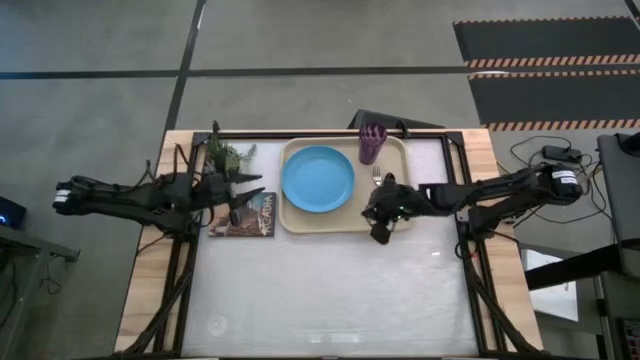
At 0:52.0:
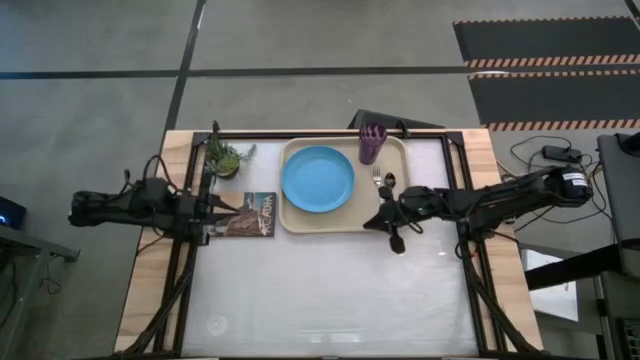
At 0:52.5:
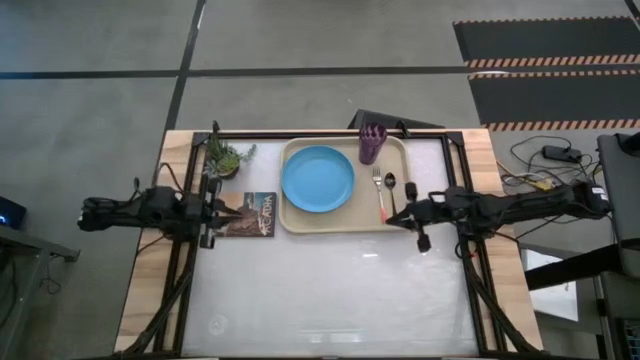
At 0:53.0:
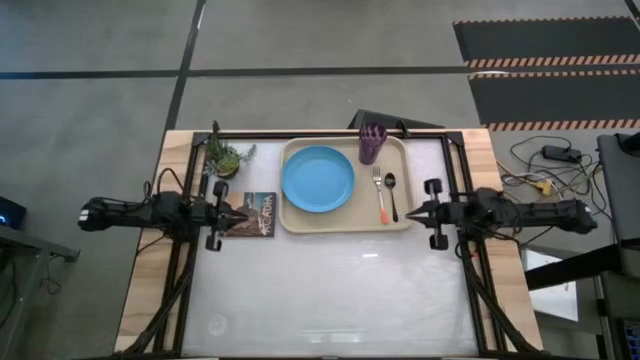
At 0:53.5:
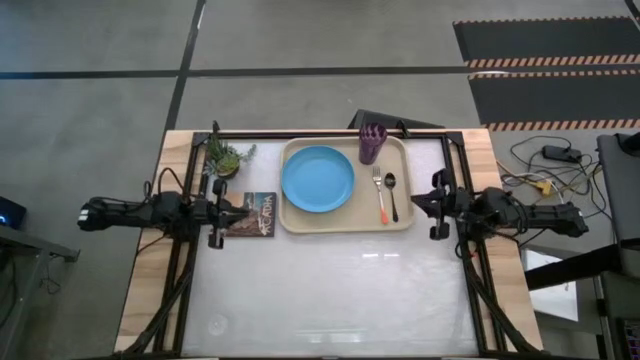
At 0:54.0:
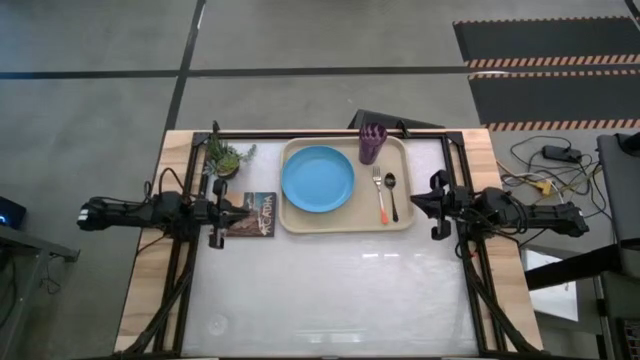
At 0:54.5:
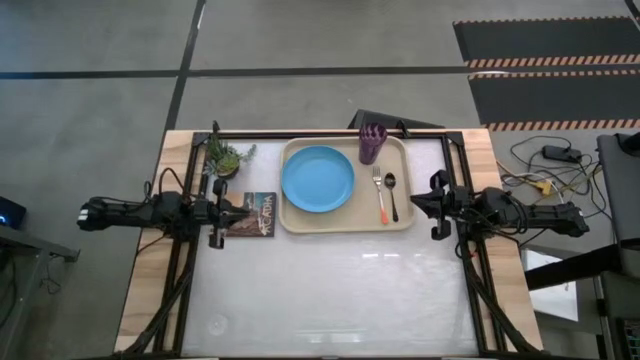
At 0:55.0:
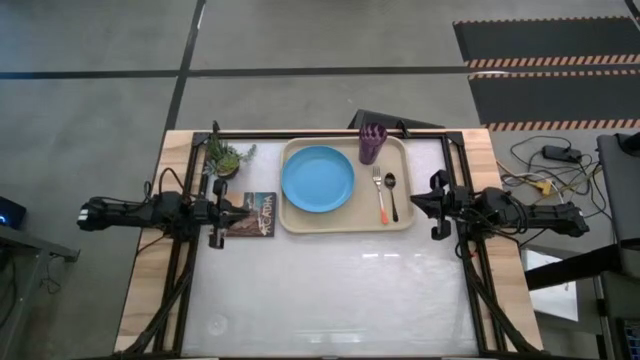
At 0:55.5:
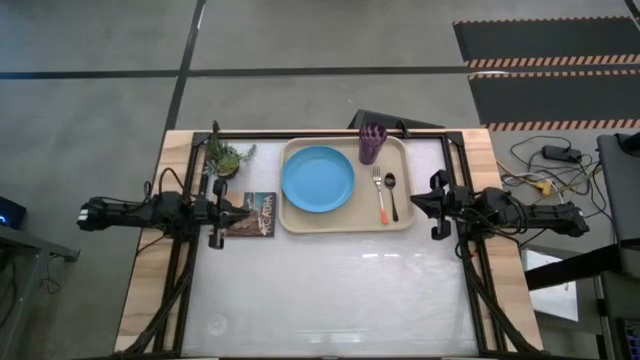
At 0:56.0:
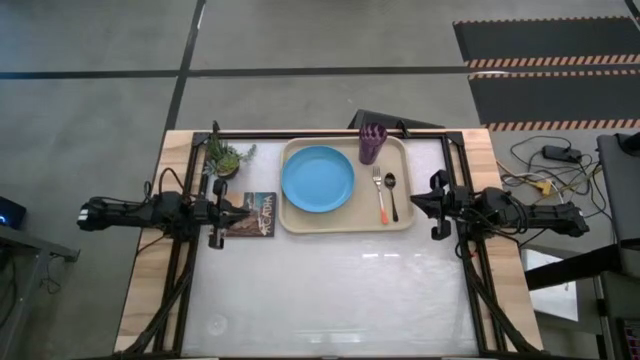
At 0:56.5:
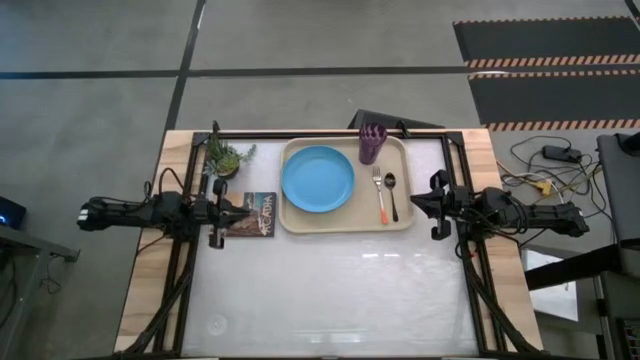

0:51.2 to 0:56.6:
Task: Pick and place plate/cup/fork/spoon on tray
Return to Home Position

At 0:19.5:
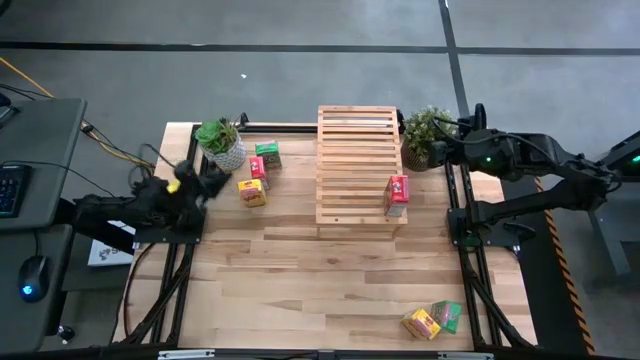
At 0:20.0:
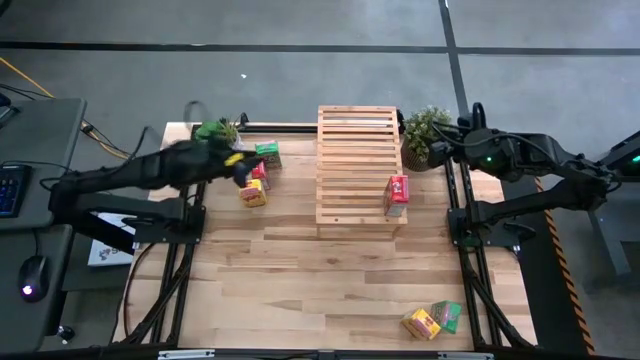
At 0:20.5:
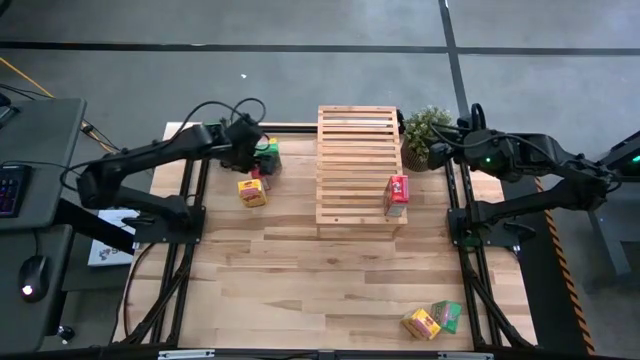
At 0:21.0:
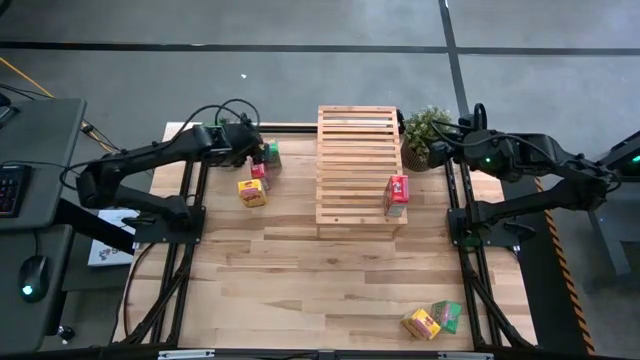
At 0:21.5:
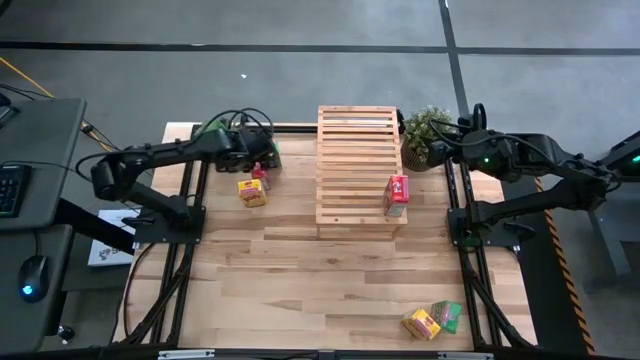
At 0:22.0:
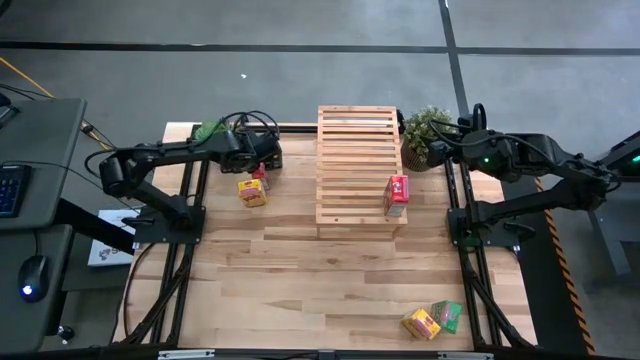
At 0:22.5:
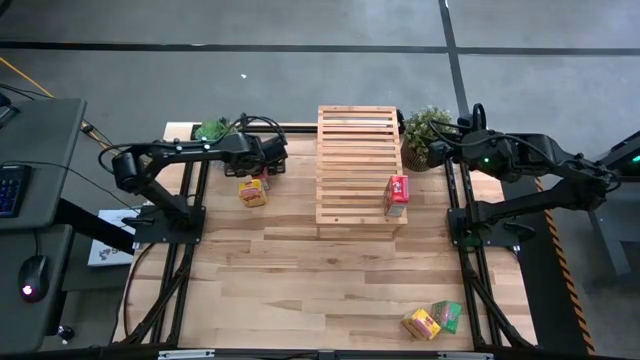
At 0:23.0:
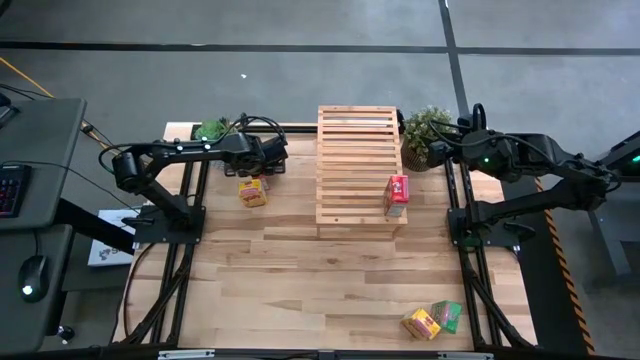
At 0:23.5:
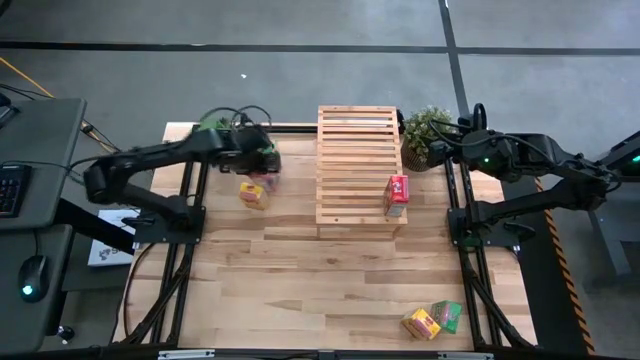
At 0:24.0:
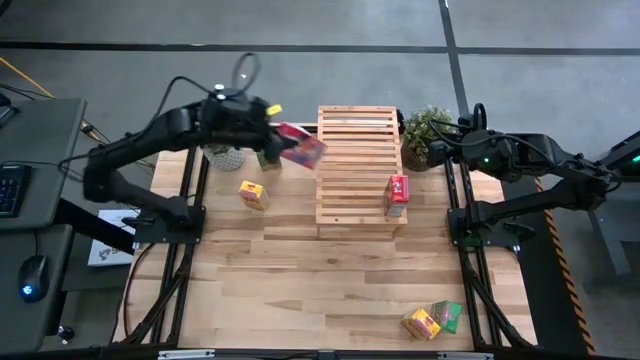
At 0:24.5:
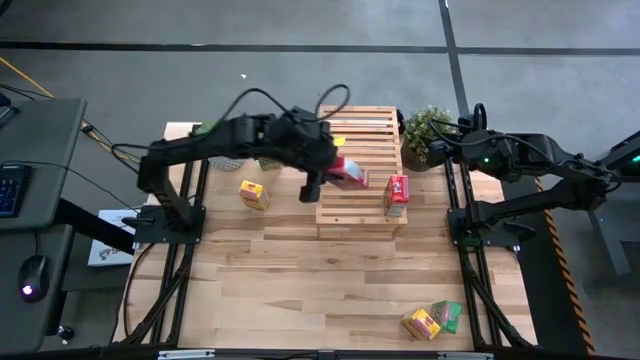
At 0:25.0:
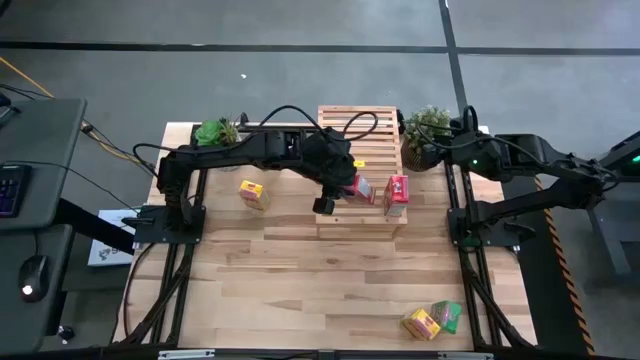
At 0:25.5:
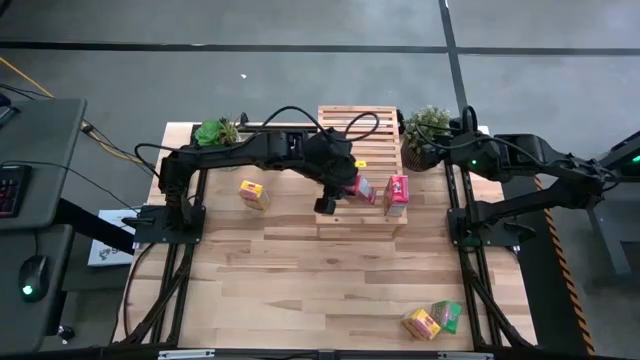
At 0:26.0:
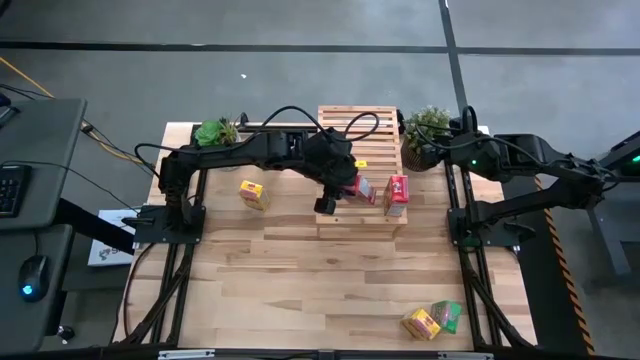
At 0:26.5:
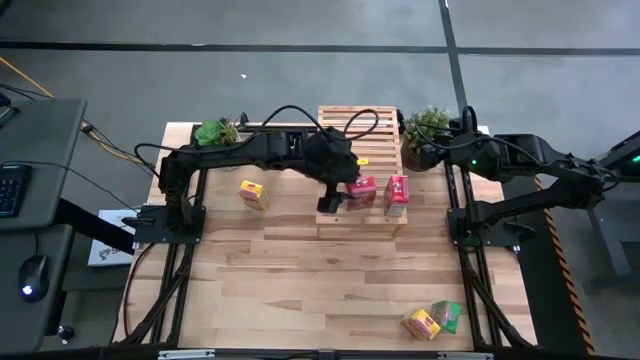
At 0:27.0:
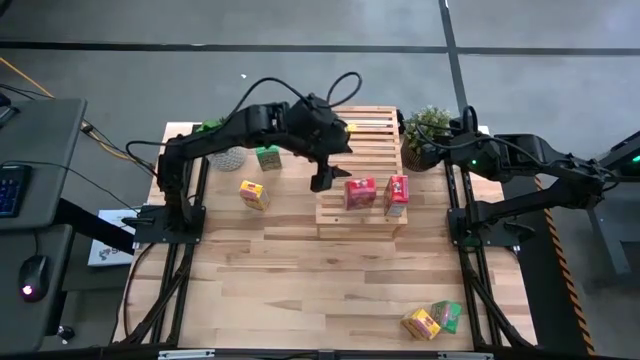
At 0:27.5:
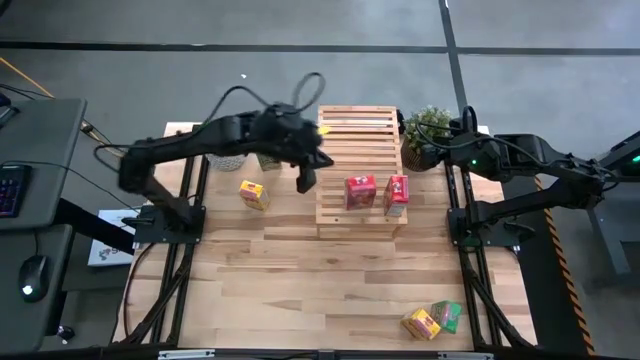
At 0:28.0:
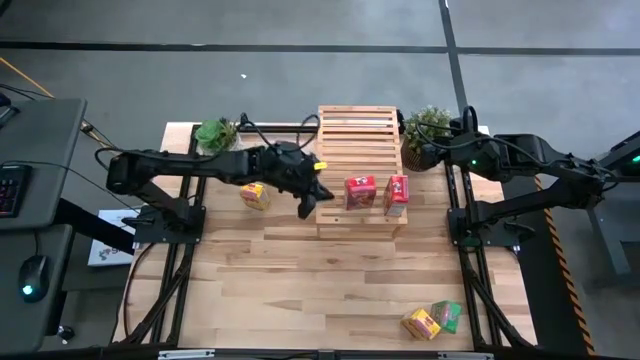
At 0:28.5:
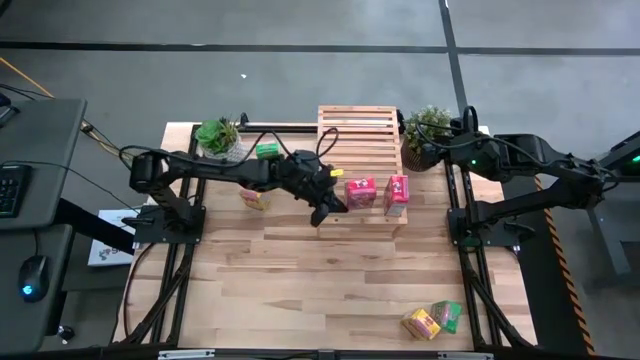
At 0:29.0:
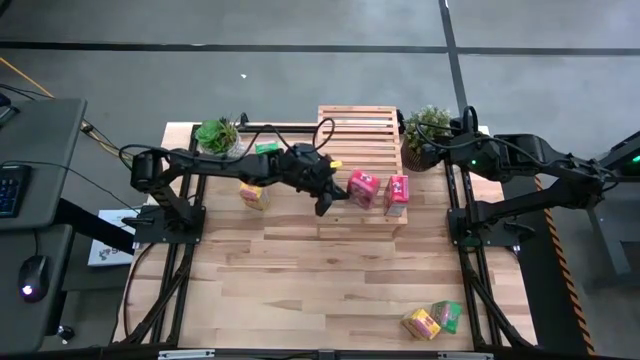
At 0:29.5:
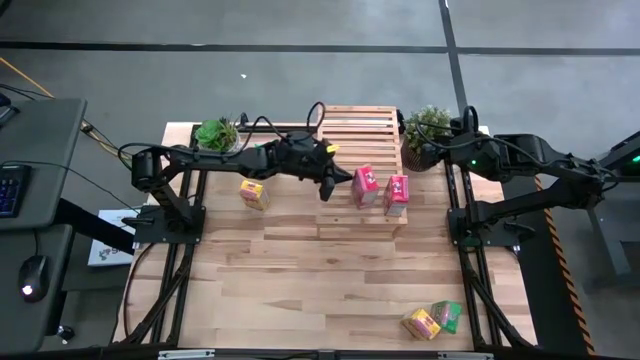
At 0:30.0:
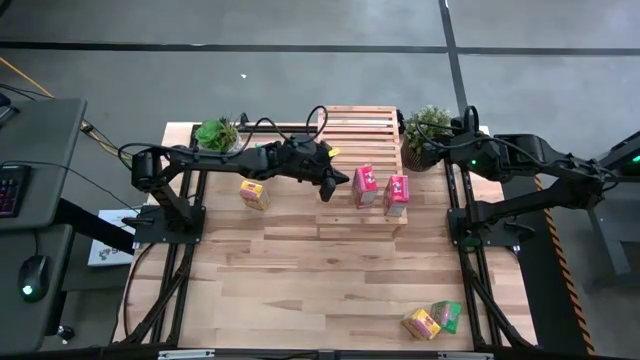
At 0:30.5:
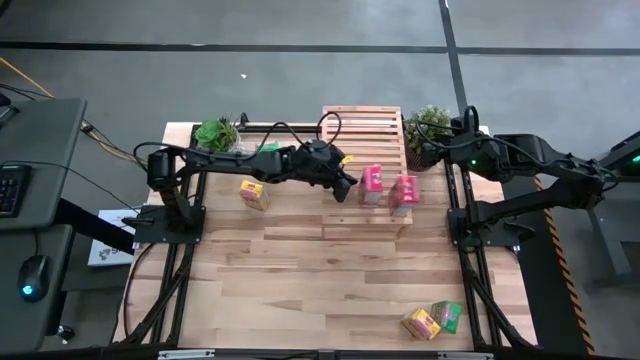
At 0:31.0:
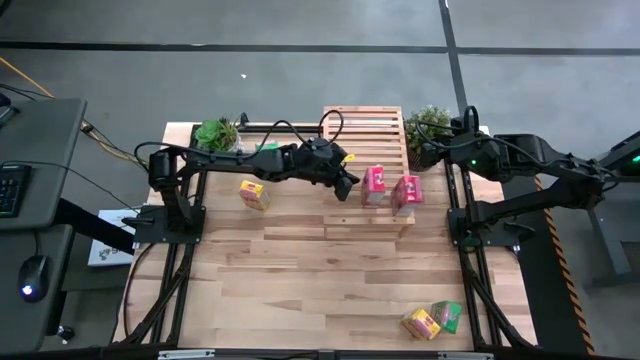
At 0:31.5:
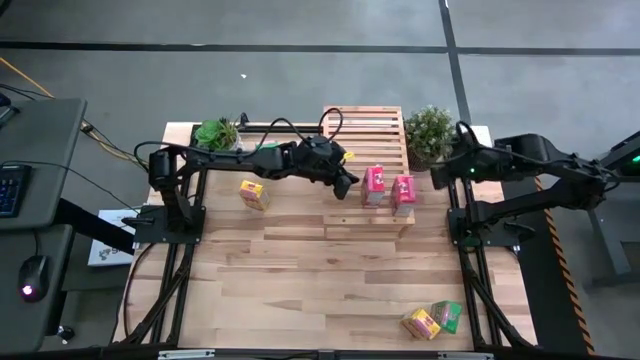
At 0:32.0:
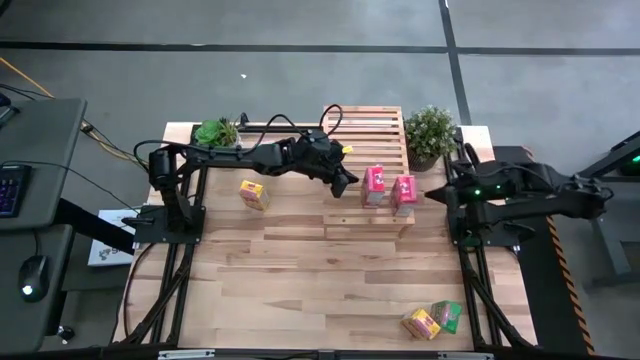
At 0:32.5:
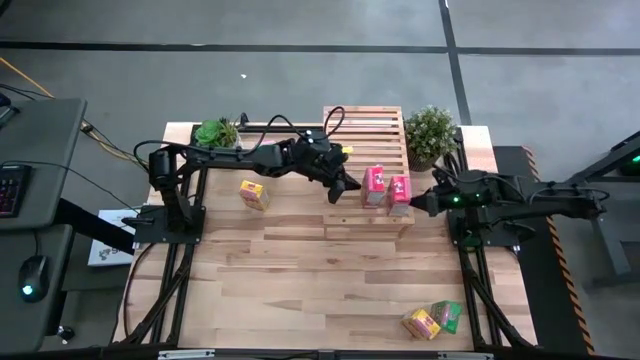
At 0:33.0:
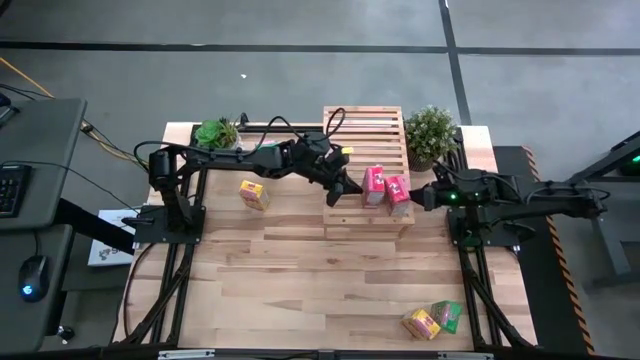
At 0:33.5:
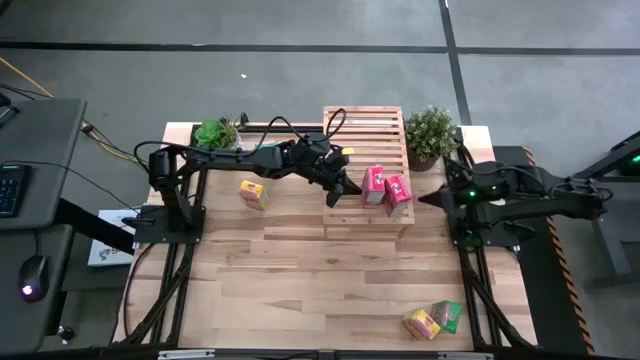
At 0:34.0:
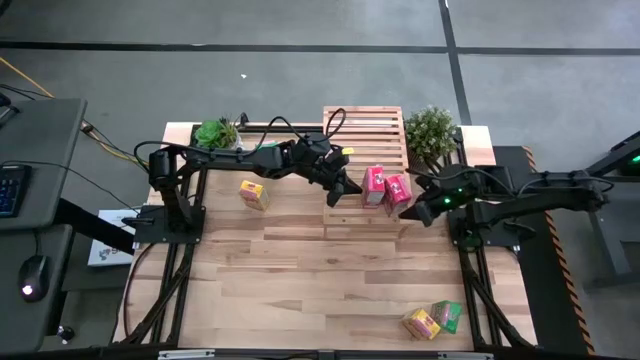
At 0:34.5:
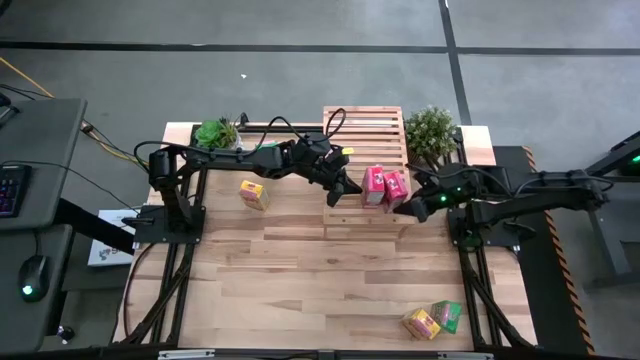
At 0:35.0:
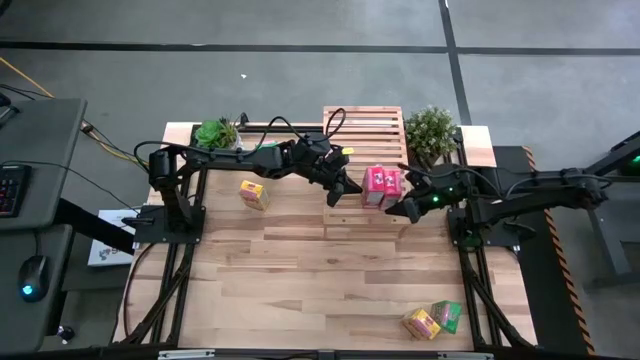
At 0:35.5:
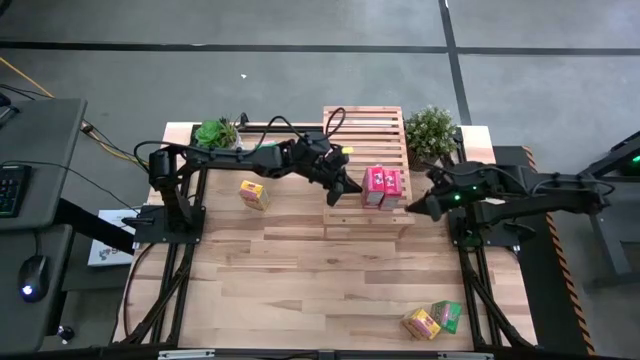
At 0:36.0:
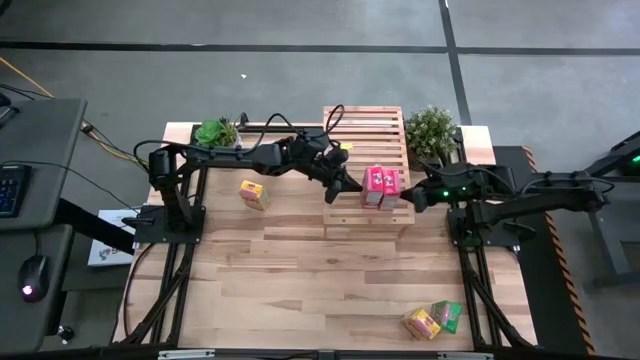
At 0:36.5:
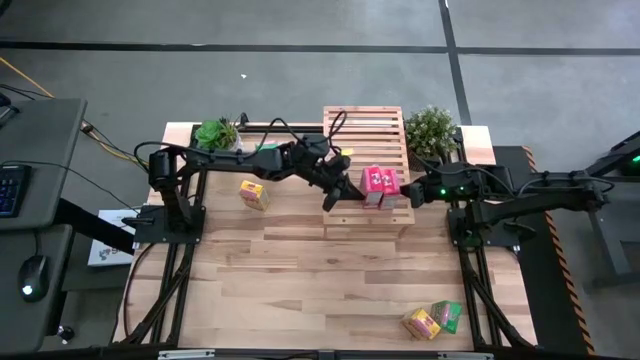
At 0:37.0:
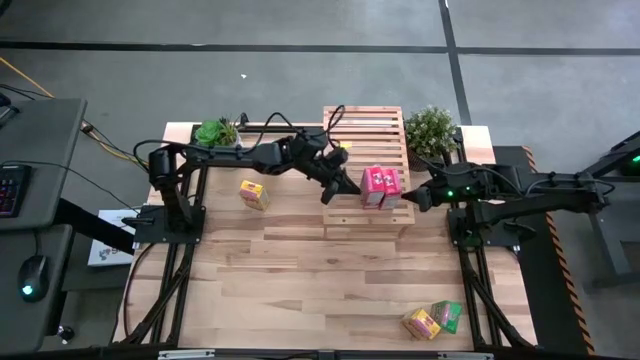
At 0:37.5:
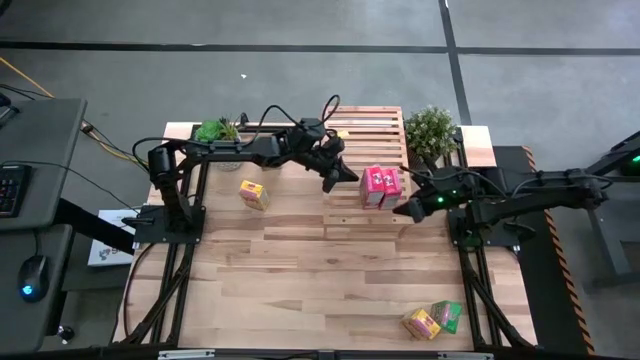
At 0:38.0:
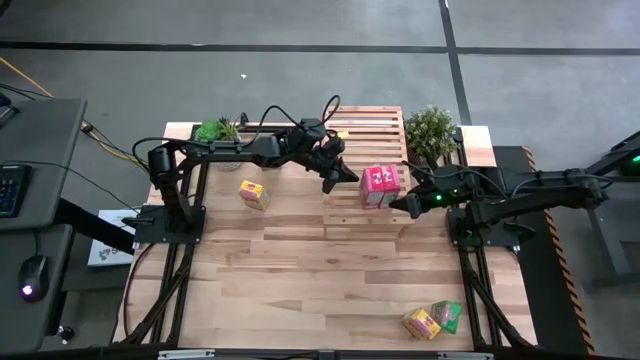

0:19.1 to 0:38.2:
Task: Stack cereal on shelf
Put the red cereal box on the shelf aligned with the other red cereal box
